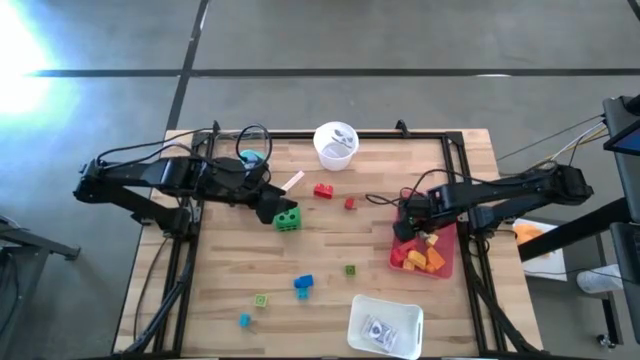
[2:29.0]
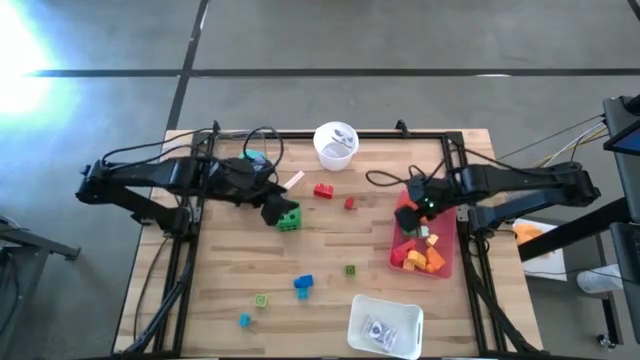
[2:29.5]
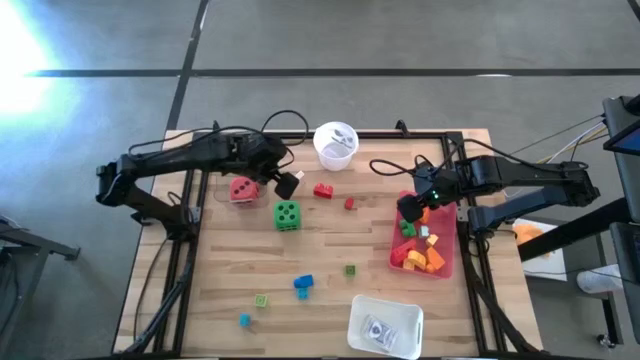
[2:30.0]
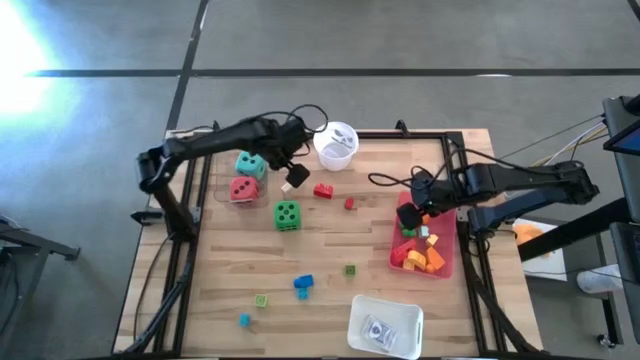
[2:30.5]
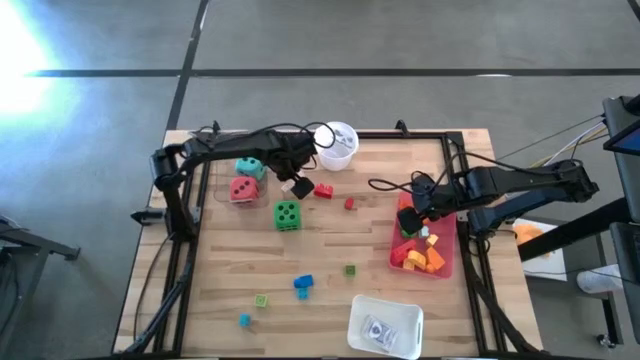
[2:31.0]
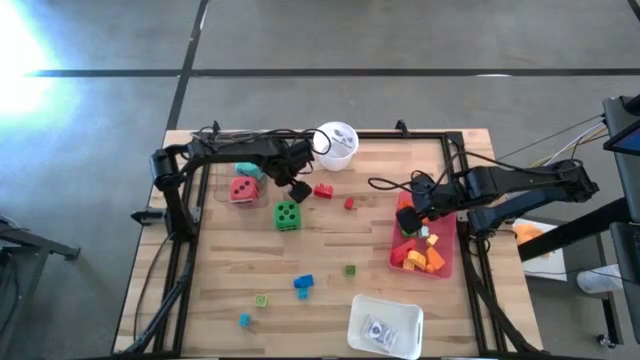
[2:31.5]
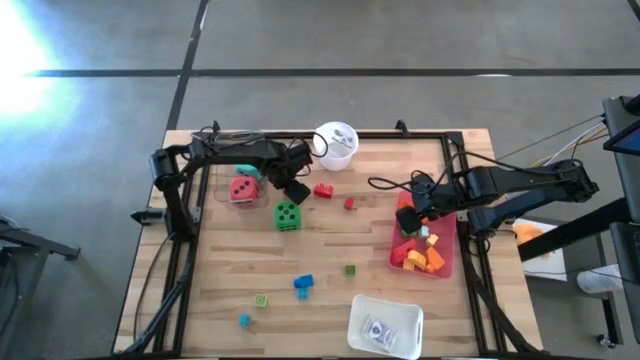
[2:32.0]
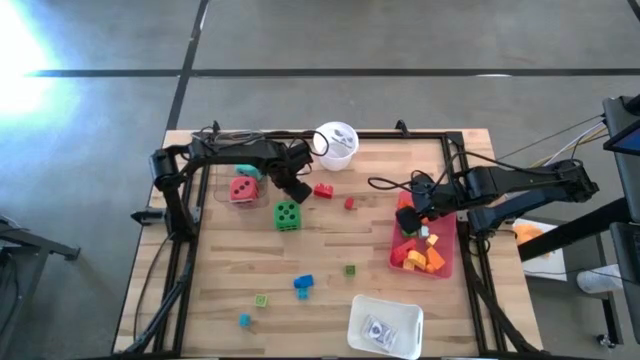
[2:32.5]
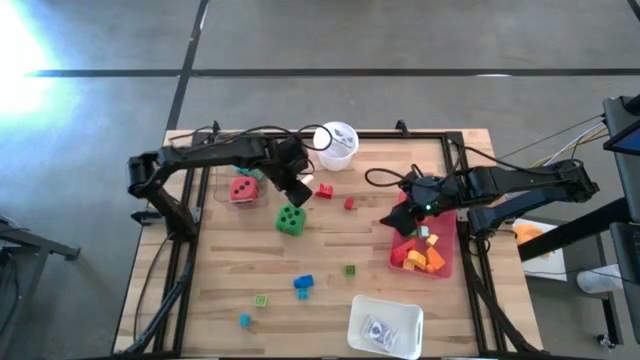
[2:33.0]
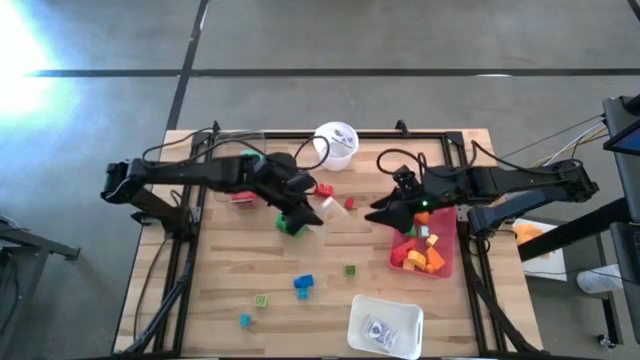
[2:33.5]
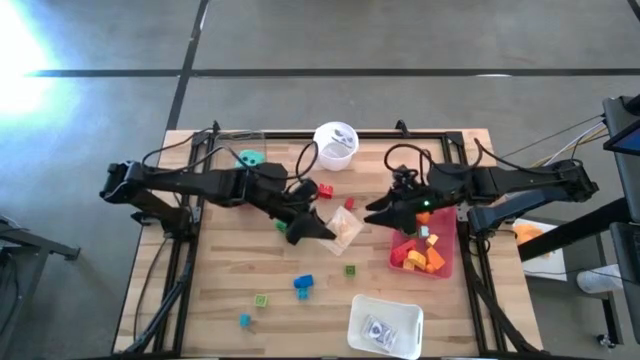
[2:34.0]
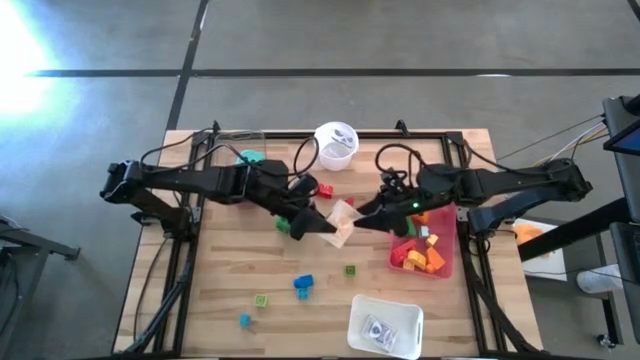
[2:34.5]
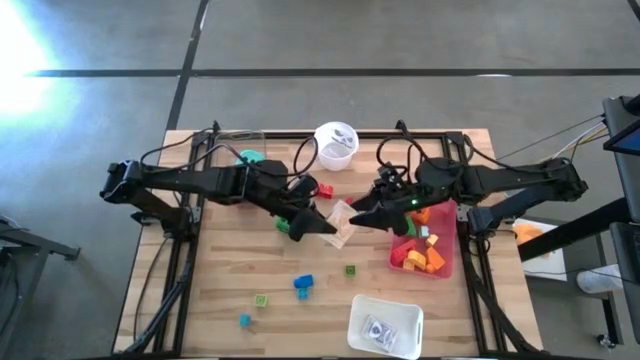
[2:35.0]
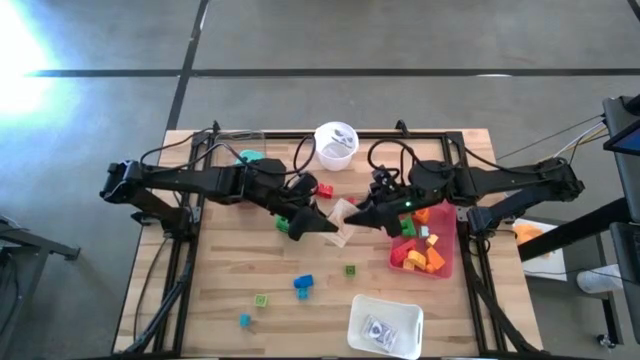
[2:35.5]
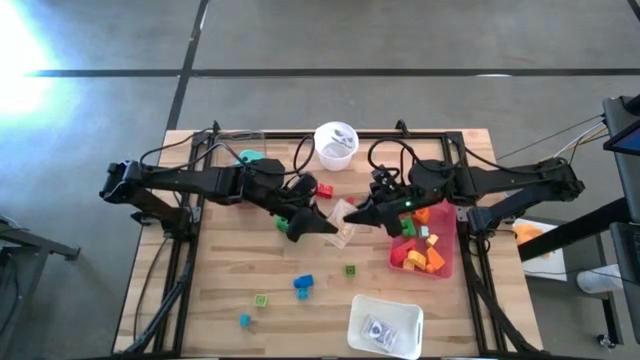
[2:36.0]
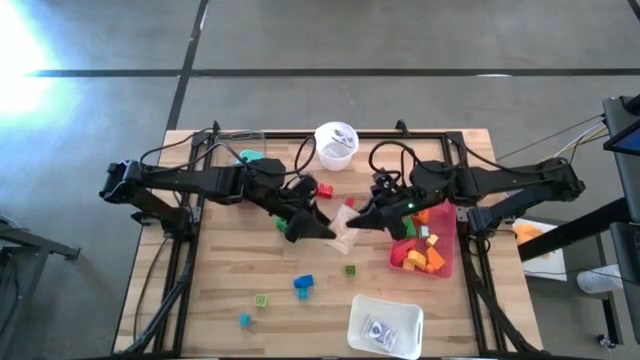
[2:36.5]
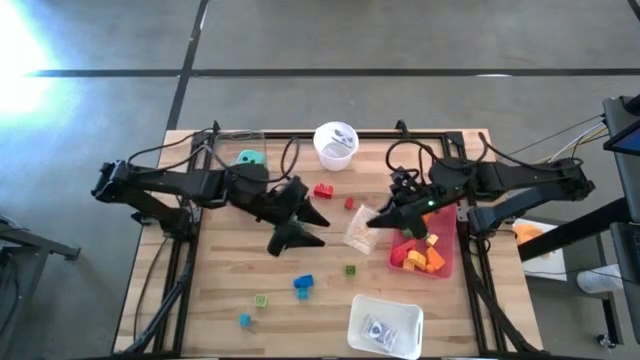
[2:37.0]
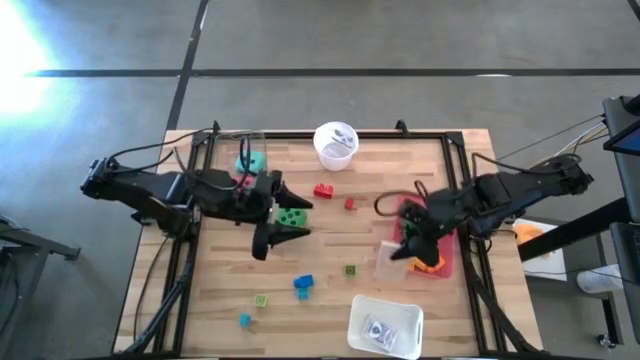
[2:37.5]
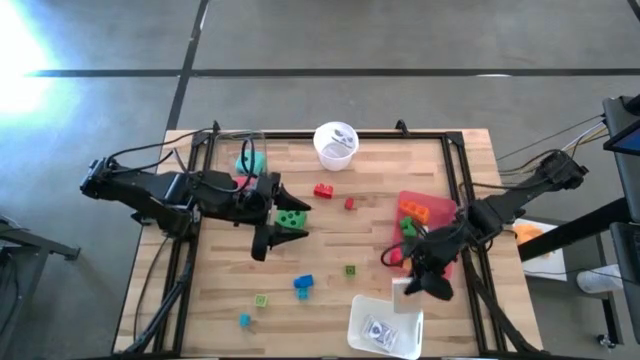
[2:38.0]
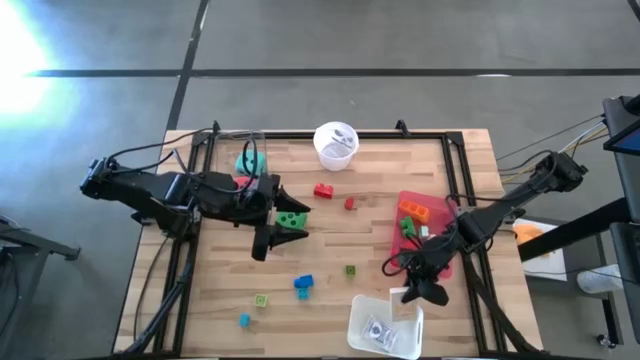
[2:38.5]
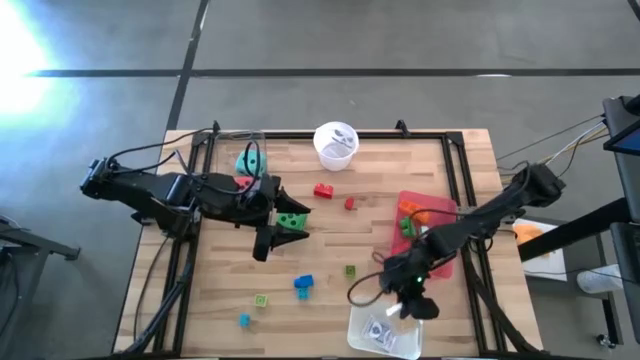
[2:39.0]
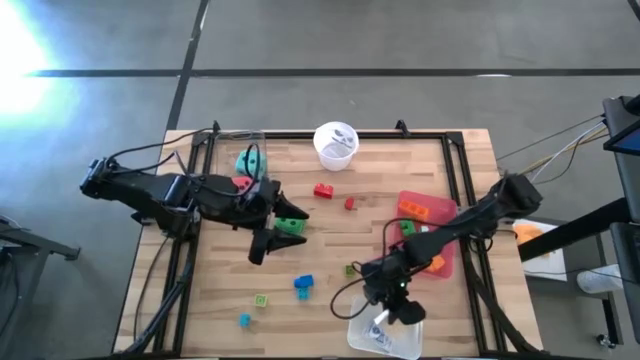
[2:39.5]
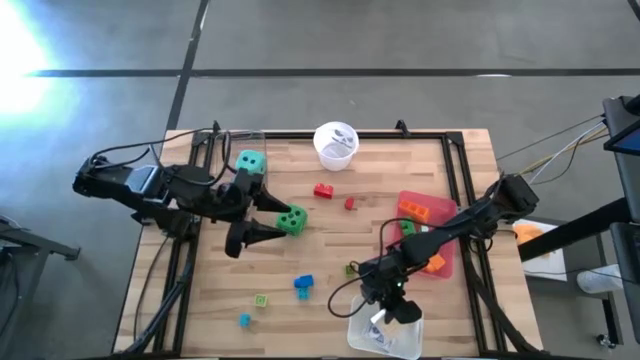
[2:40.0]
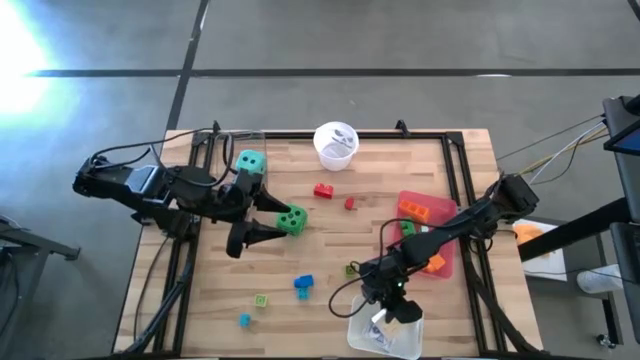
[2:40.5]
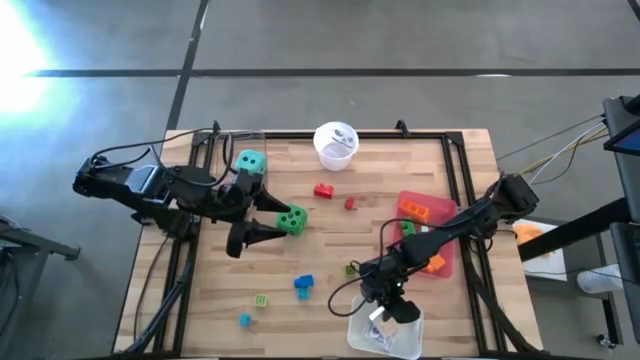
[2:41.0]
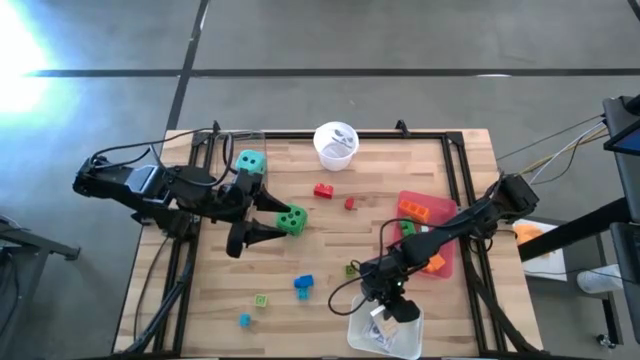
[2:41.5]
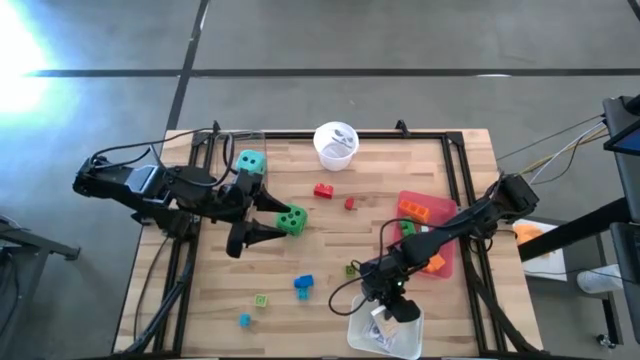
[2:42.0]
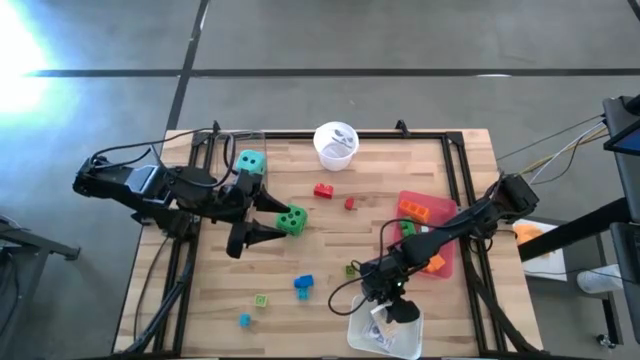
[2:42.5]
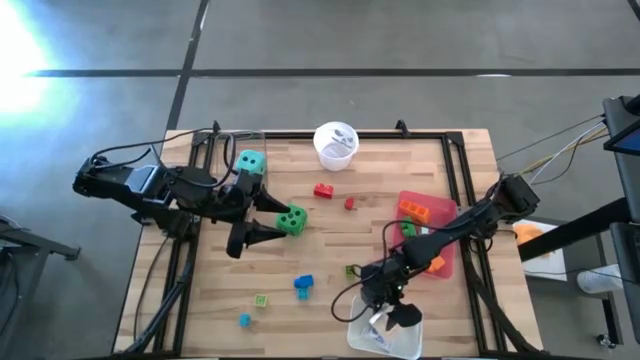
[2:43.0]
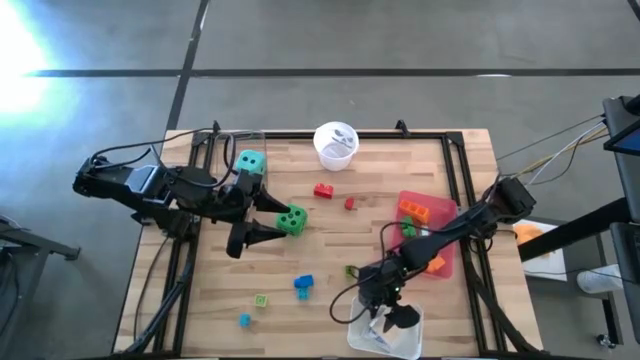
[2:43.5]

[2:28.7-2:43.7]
Task: Pick & Place Toys
Put the orange deck of cards into the white bin

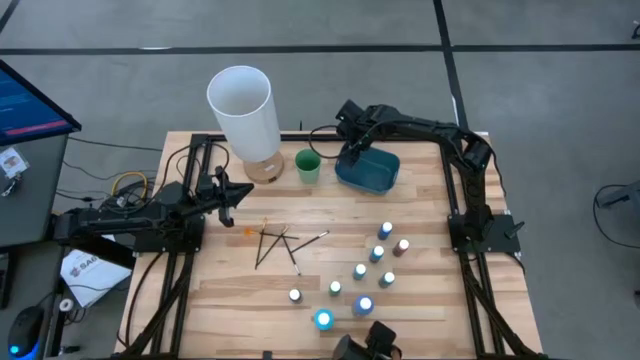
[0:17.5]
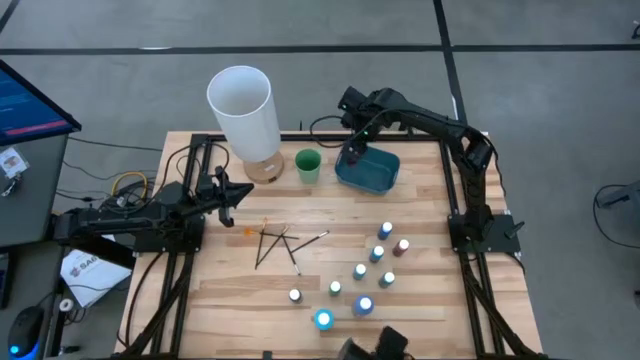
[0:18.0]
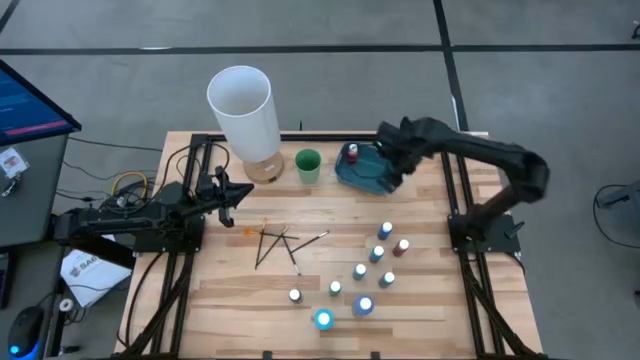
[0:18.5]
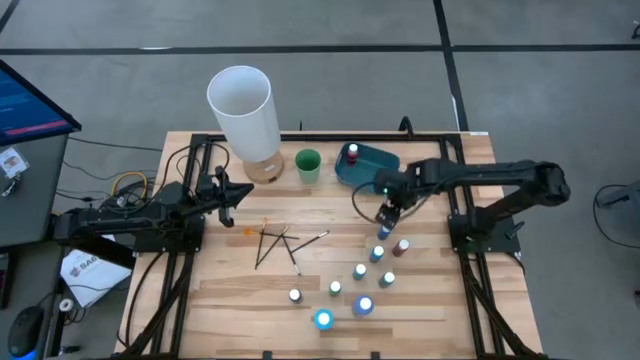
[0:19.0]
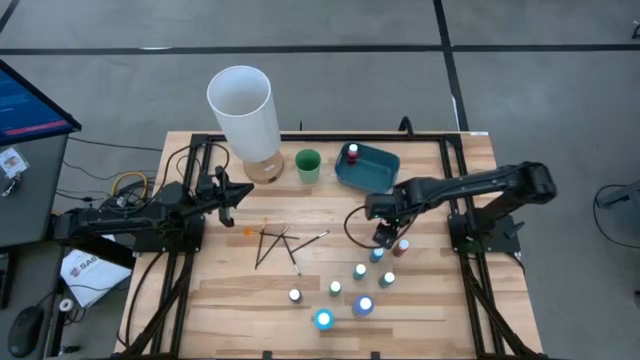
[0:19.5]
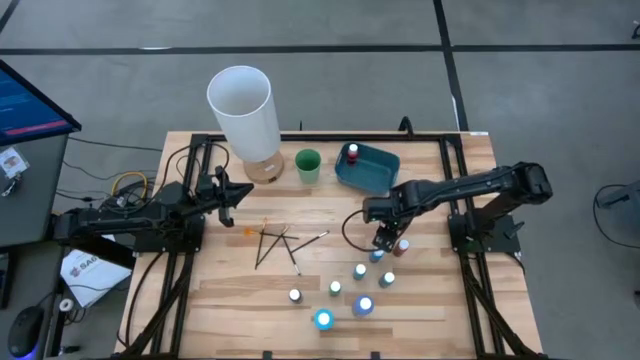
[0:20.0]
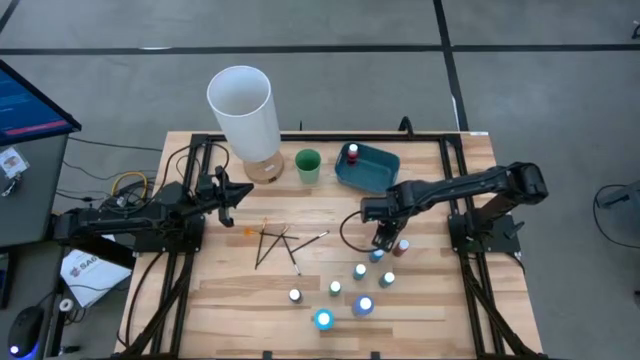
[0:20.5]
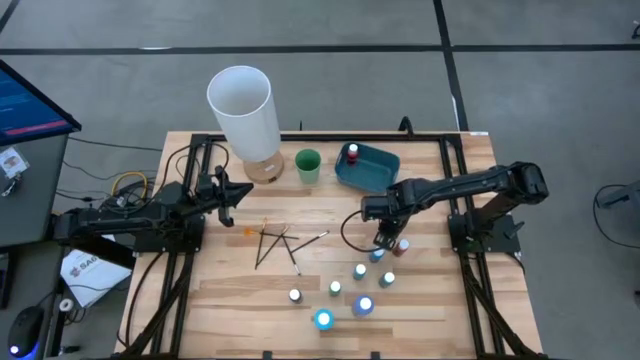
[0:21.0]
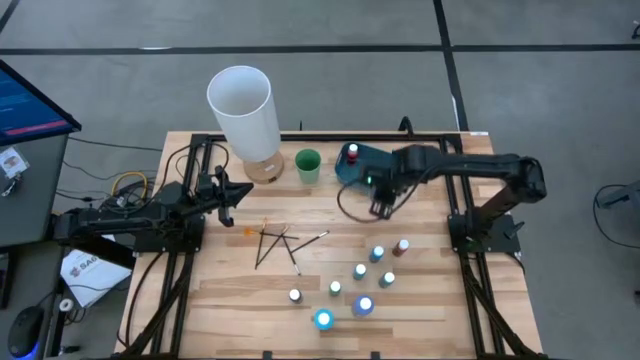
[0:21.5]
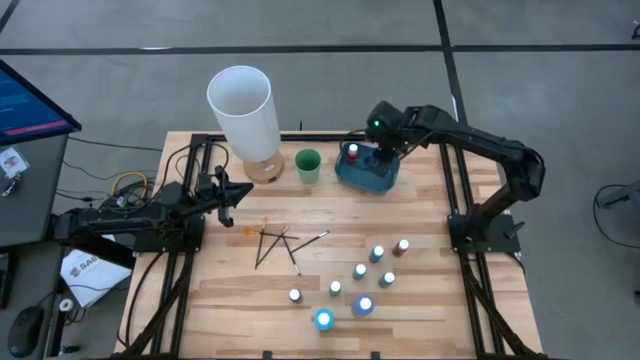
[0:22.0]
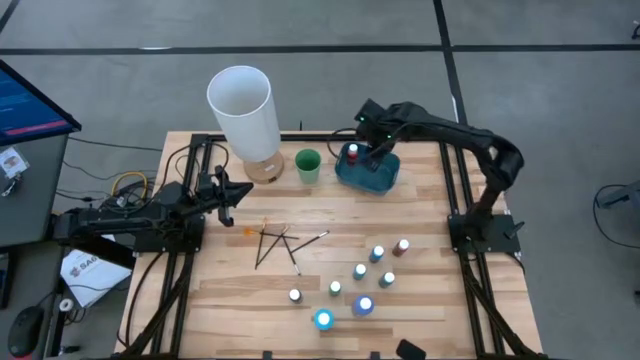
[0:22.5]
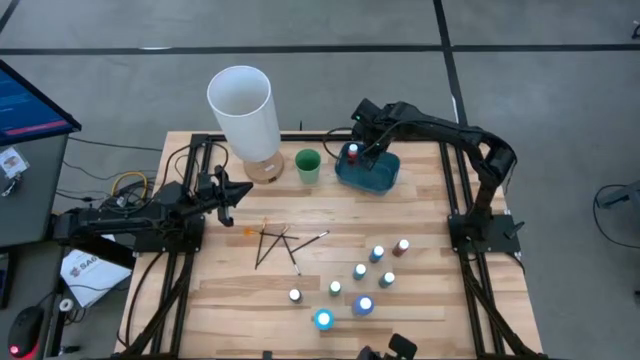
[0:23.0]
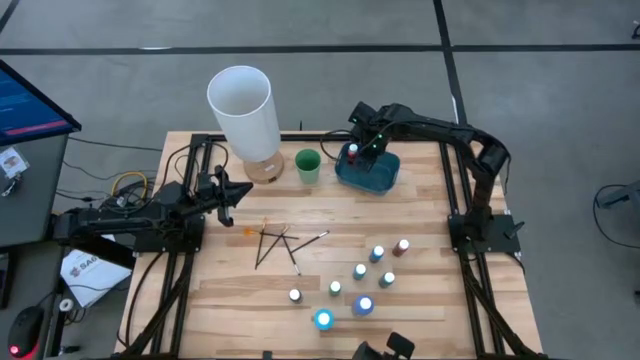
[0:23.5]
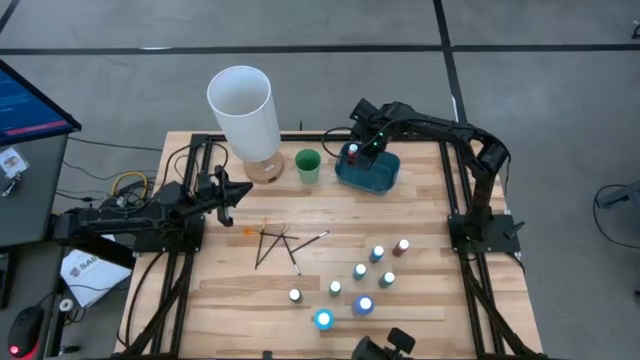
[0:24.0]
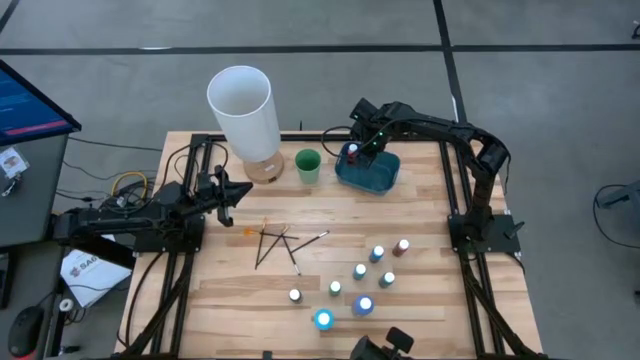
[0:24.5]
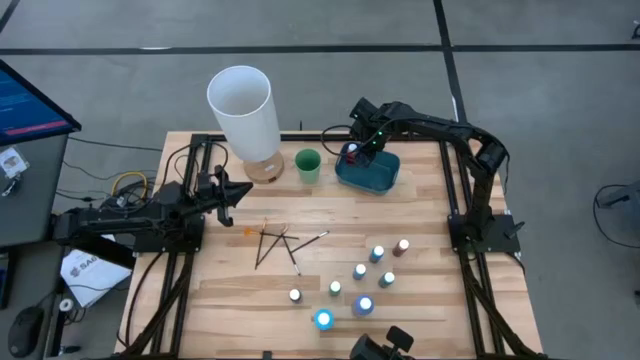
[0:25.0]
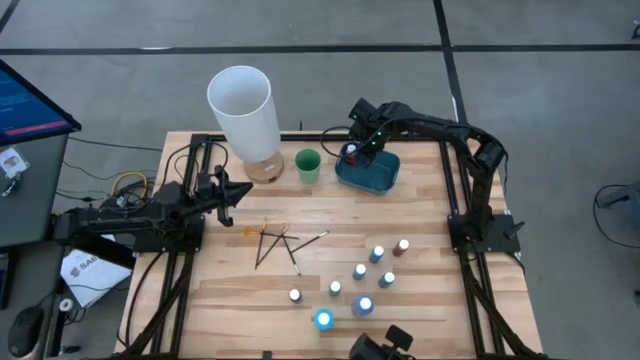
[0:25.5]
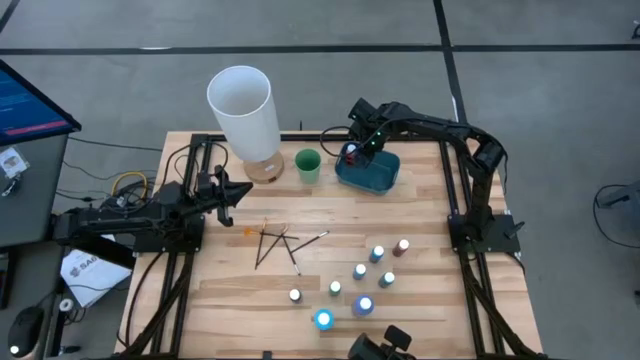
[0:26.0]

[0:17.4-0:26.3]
Task: Pick & Place Paint Supplies
Put the top small blue paint bottle into the blue bin
